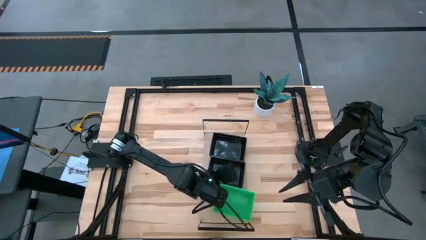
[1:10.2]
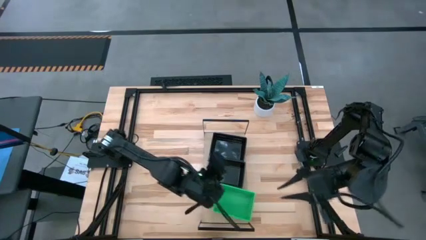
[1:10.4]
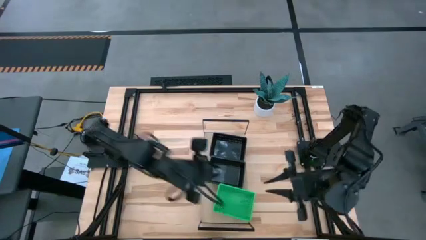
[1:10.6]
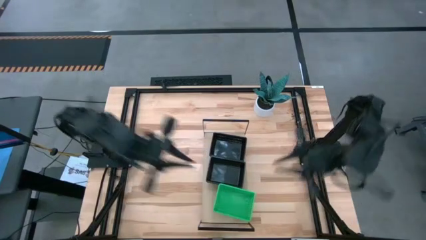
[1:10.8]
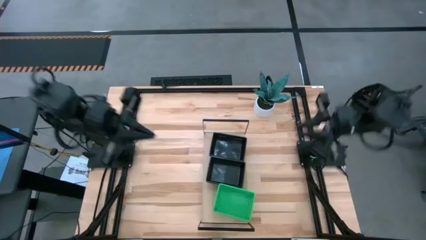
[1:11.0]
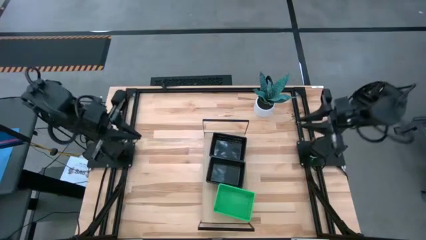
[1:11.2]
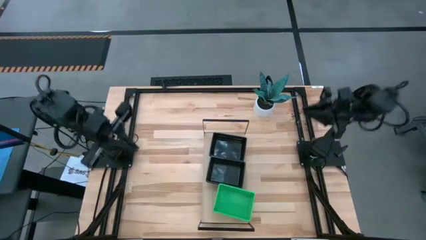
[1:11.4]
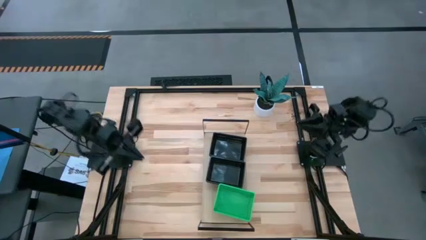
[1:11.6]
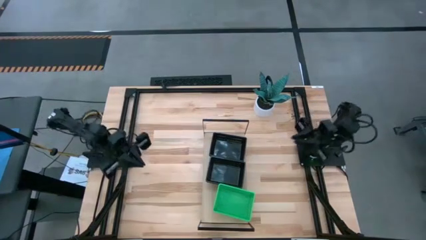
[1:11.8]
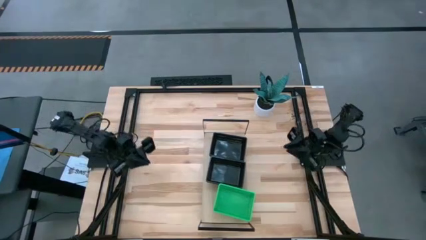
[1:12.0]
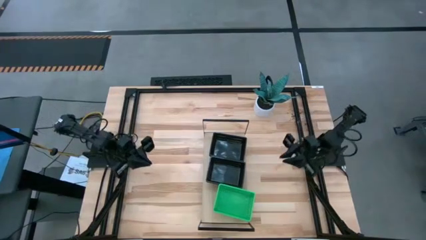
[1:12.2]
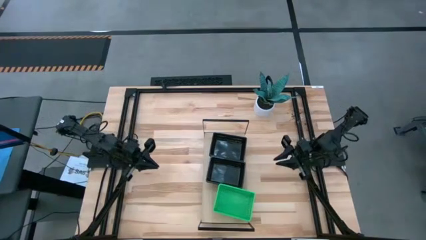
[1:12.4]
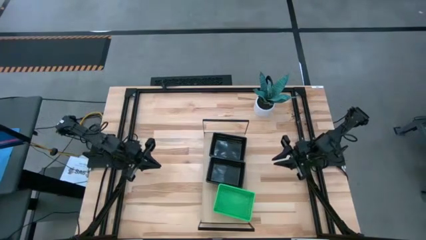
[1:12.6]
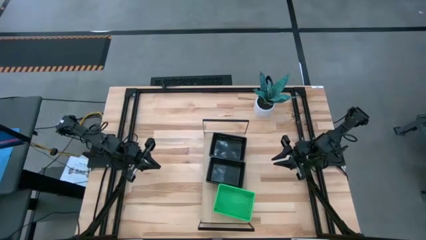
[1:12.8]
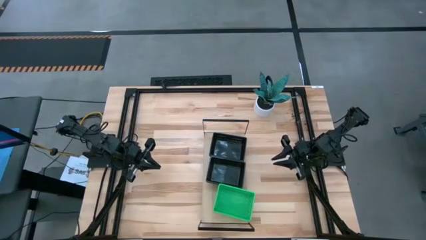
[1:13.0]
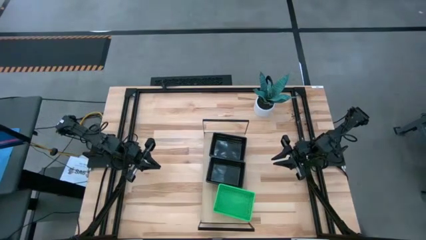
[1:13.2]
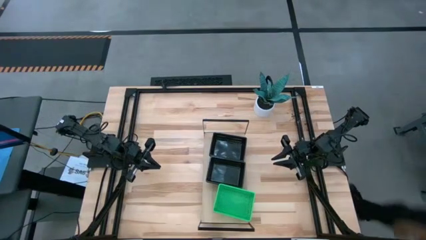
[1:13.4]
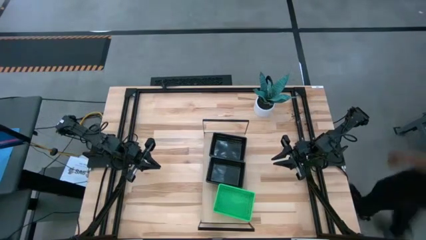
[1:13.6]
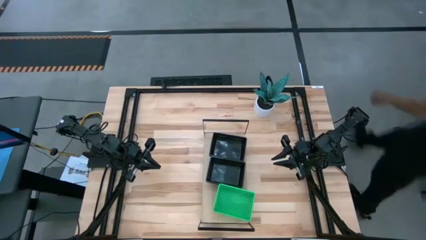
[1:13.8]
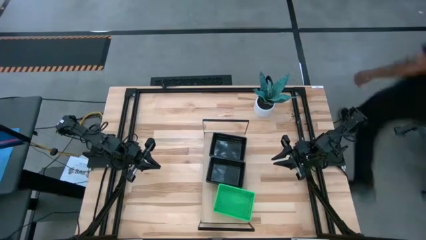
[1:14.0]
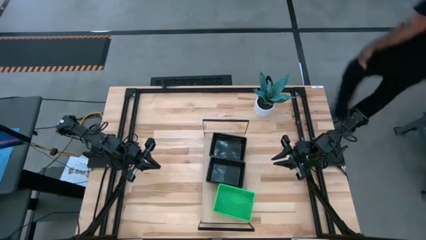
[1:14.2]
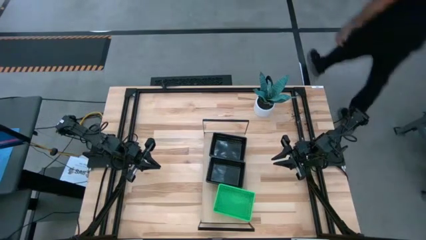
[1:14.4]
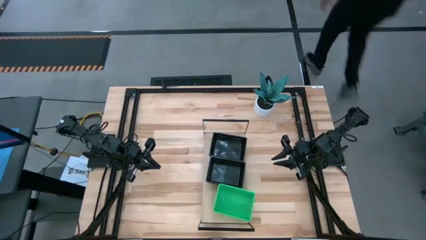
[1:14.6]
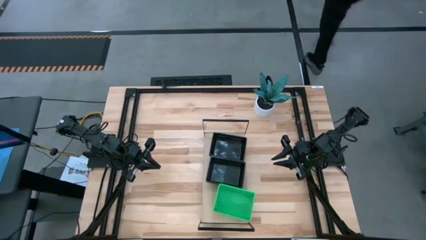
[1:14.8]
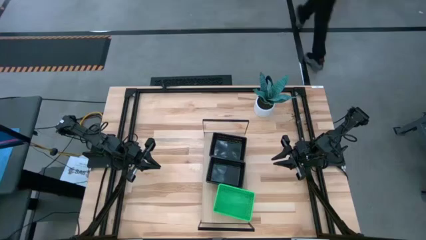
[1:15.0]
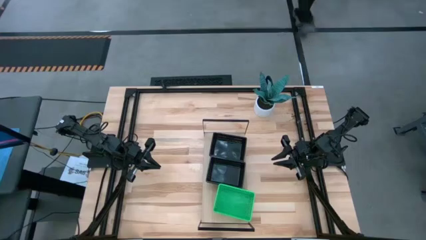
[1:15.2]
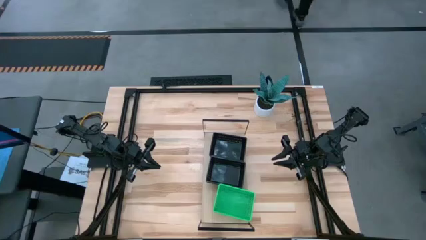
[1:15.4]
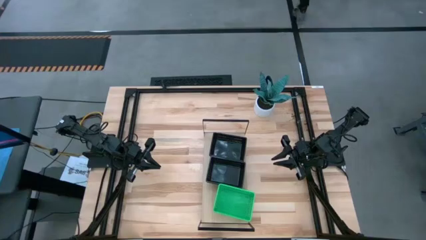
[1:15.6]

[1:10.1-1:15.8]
Task: Stack baskets on shelf by color
Return to Home Position

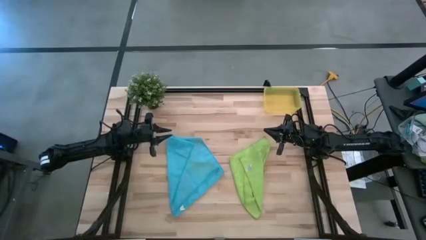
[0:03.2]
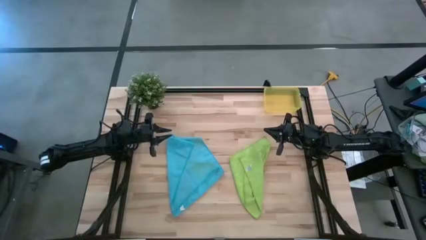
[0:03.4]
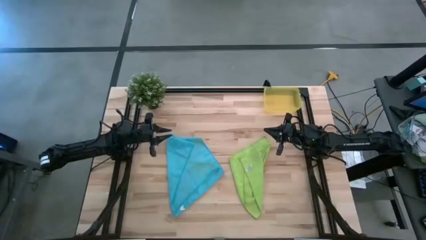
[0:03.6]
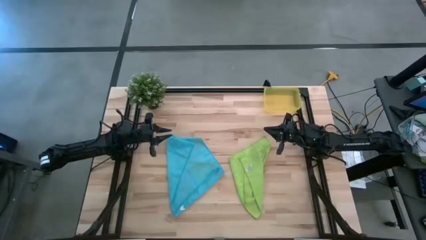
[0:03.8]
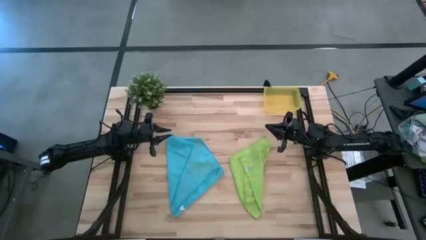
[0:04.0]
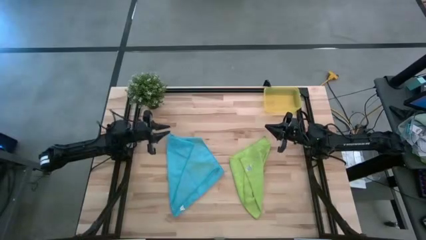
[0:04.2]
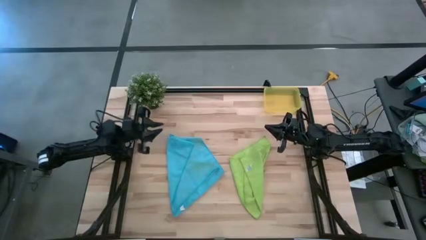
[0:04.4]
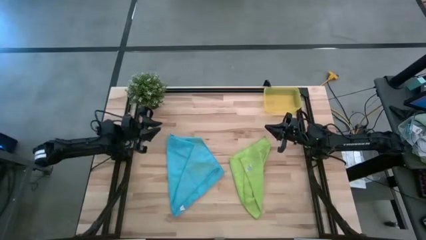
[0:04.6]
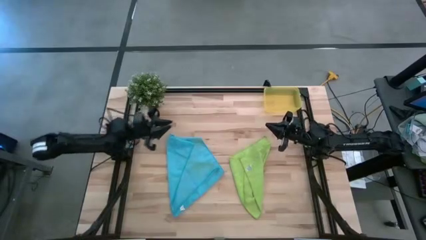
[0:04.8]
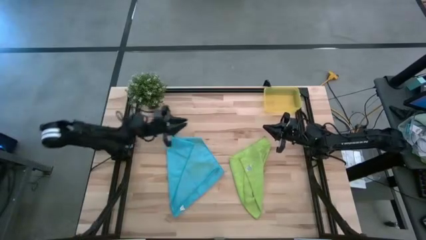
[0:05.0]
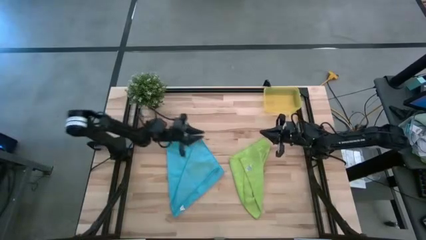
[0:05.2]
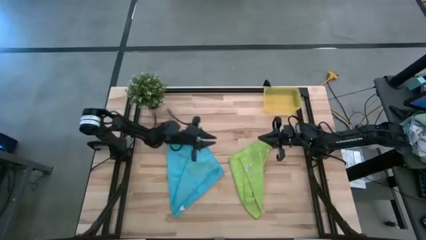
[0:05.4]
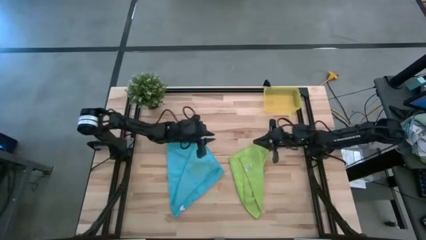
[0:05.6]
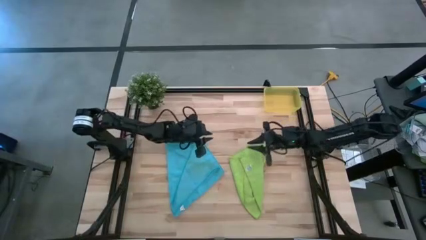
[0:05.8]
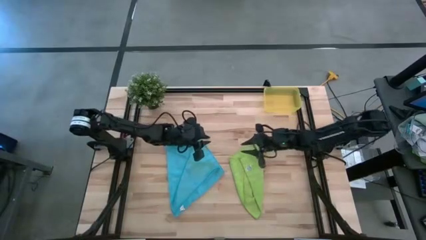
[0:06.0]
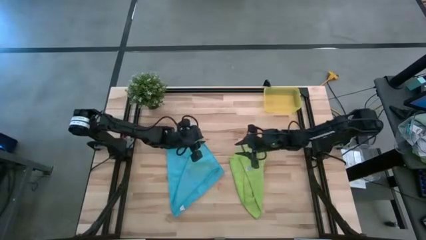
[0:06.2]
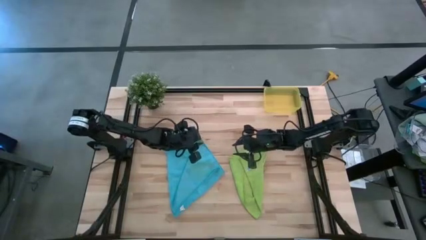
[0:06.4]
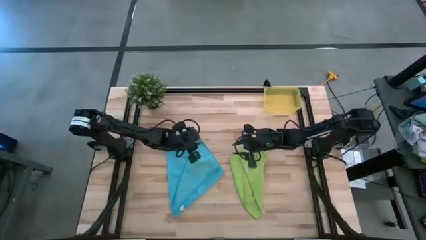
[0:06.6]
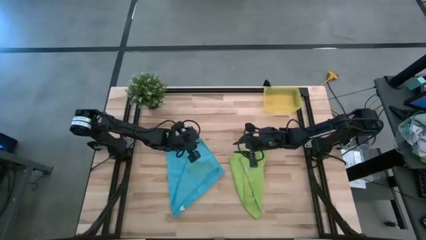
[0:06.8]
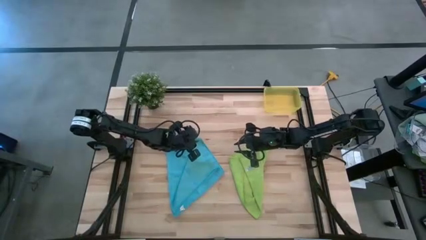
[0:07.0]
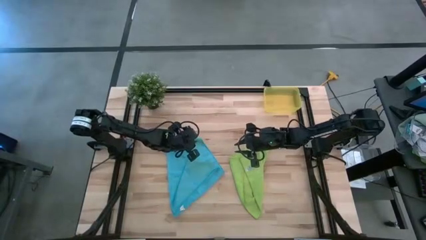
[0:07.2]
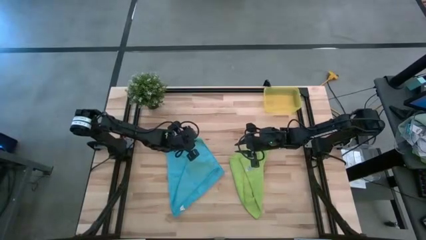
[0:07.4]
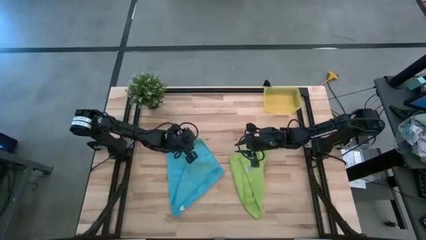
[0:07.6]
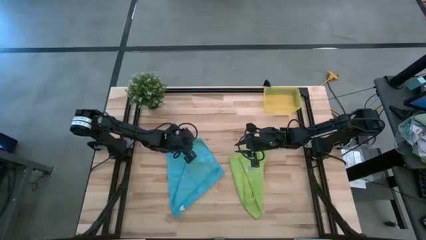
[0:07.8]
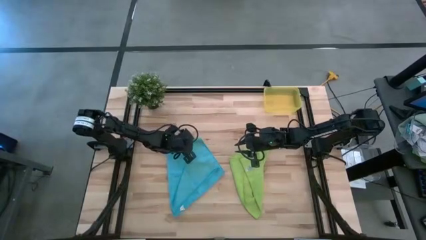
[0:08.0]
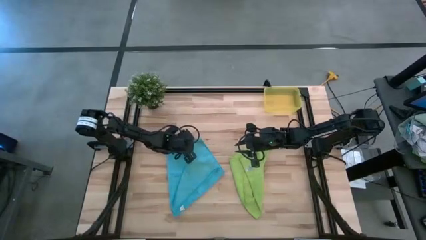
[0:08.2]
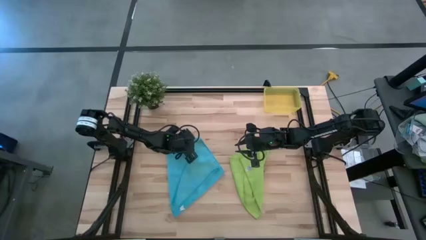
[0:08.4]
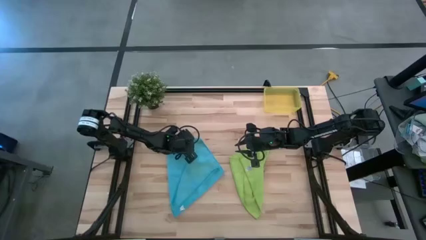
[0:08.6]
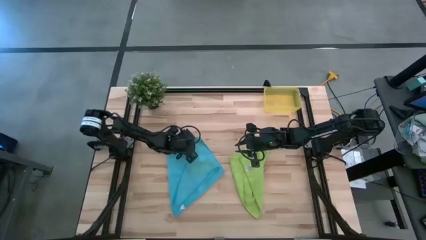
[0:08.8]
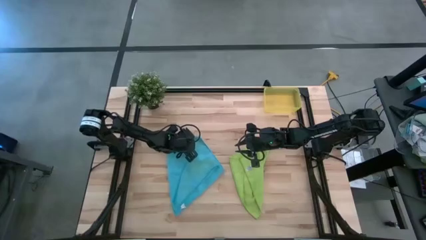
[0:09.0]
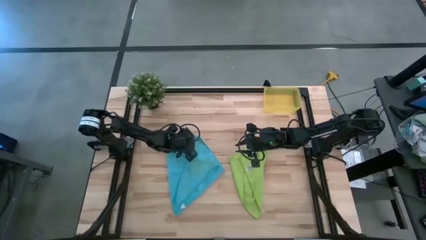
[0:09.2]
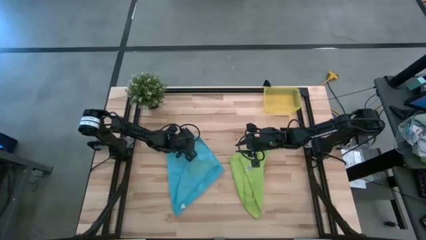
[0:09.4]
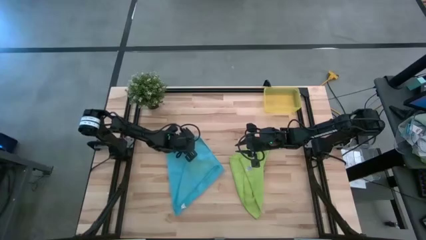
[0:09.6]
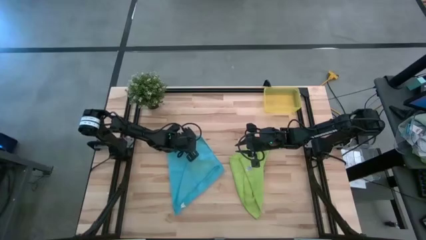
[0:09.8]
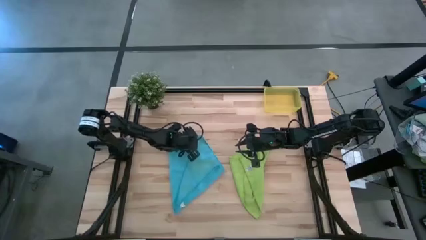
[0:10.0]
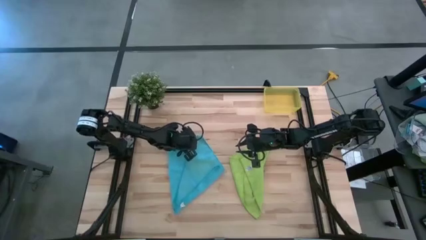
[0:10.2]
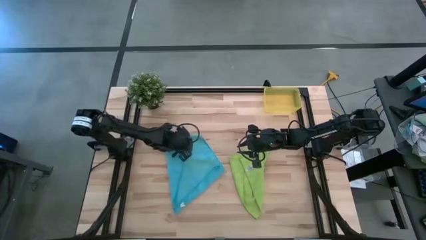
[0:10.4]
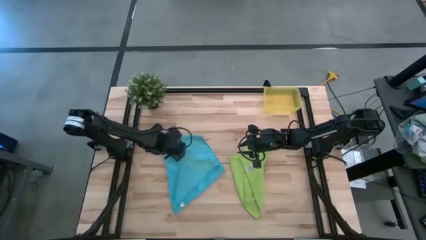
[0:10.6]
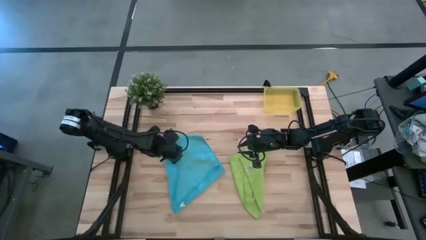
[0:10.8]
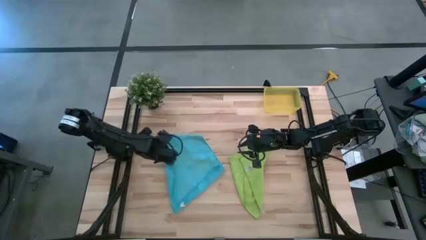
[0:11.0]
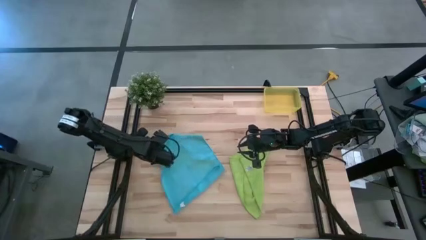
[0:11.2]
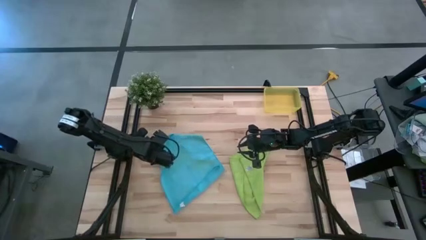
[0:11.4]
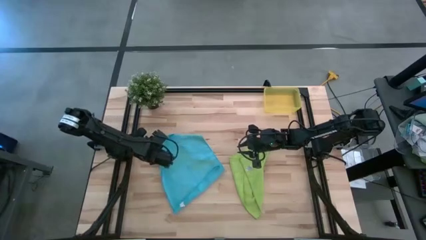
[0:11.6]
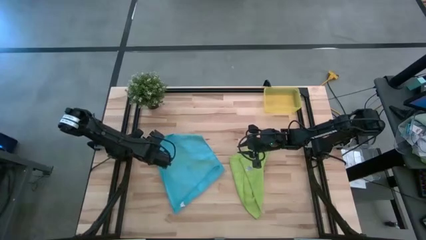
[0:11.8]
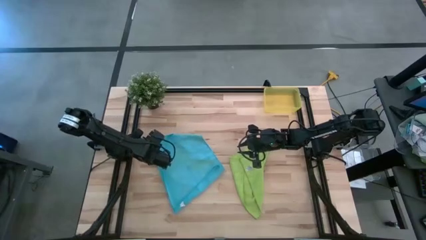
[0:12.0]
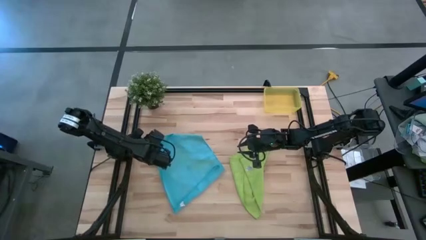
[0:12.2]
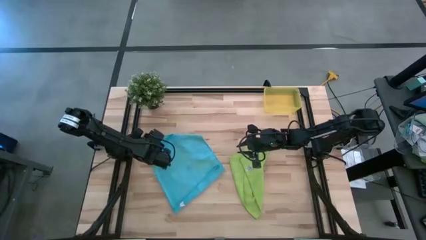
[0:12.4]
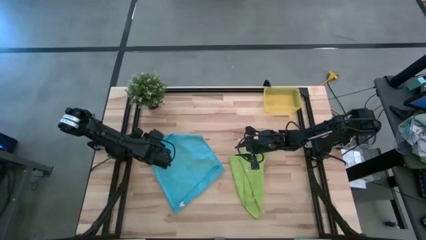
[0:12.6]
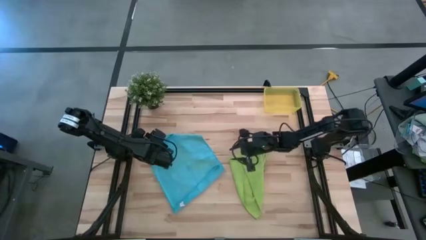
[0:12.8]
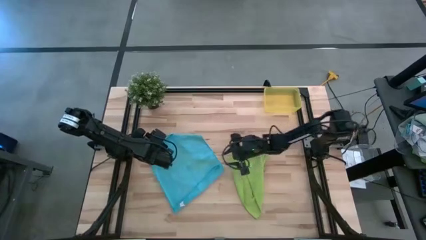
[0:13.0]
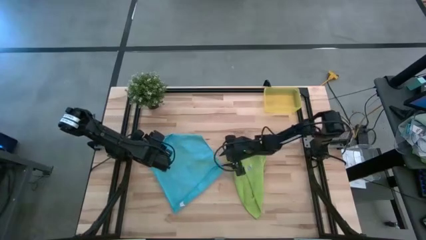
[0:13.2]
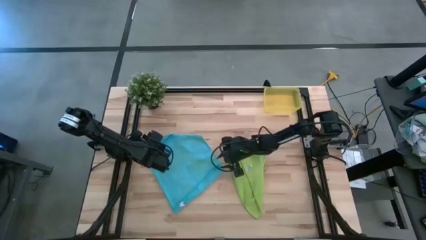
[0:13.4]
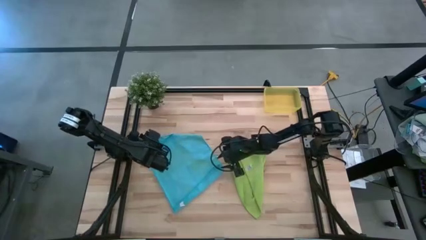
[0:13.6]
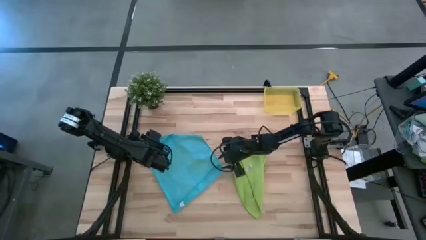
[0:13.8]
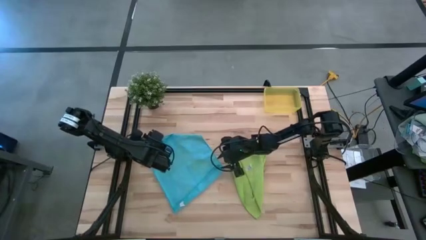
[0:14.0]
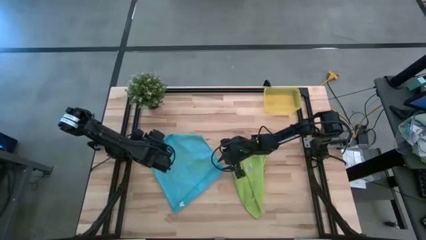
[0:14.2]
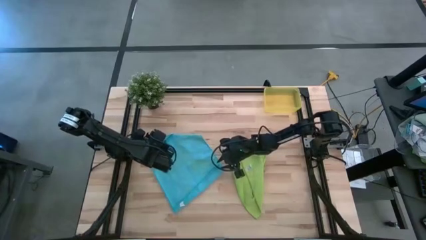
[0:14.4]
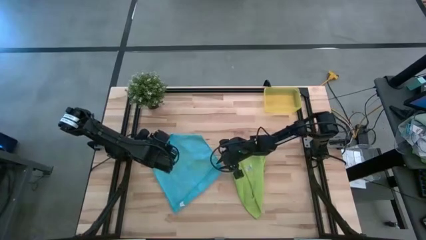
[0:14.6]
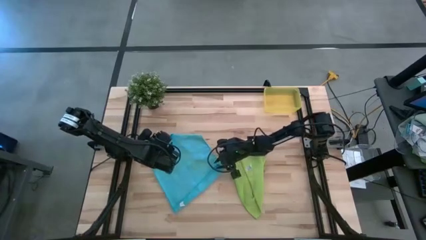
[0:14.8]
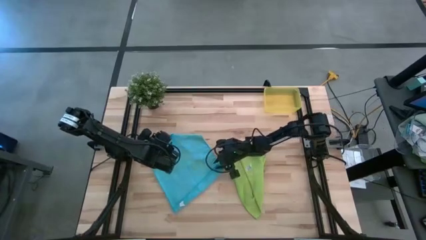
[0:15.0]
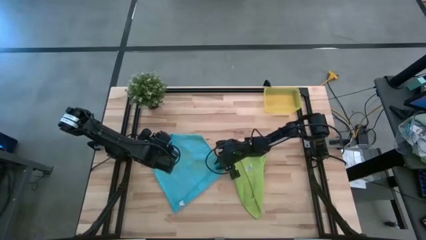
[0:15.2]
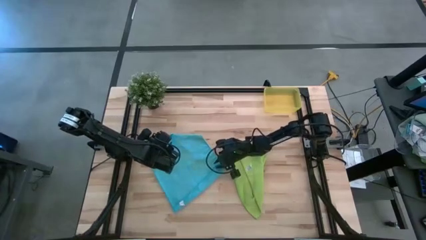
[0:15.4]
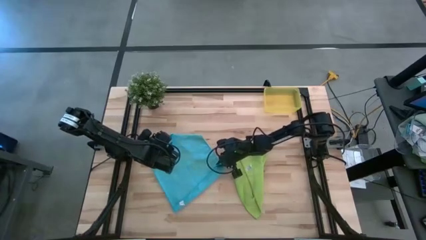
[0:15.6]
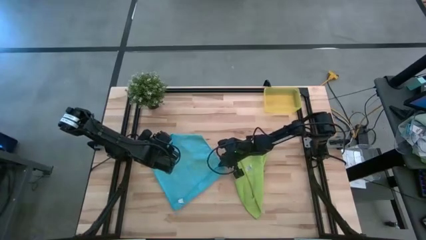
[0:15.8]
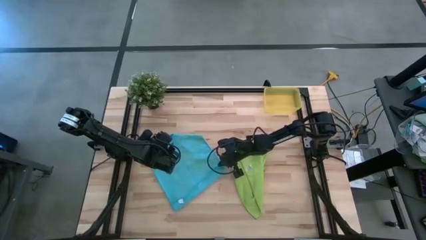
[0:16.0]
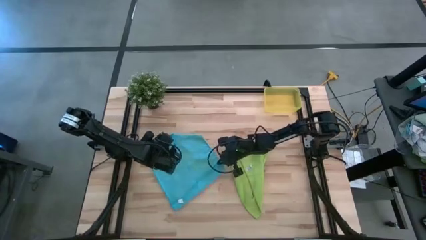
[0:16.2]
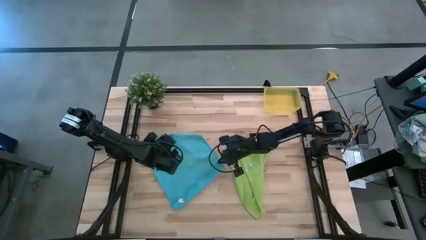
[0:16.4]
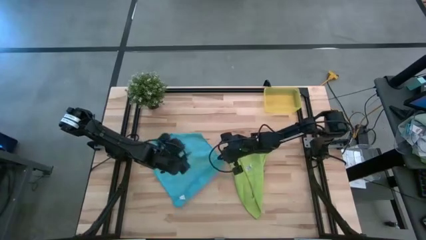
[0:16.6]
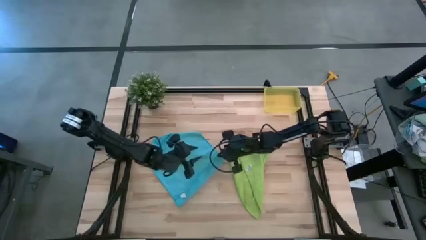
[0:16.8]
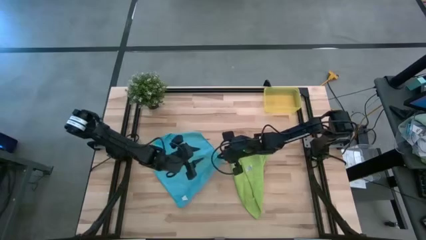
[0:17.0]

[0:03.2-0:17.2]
Task: Roll microfiber towels into tight, uniform cylinder then place into a basket
Fold the blue microfiber towel
